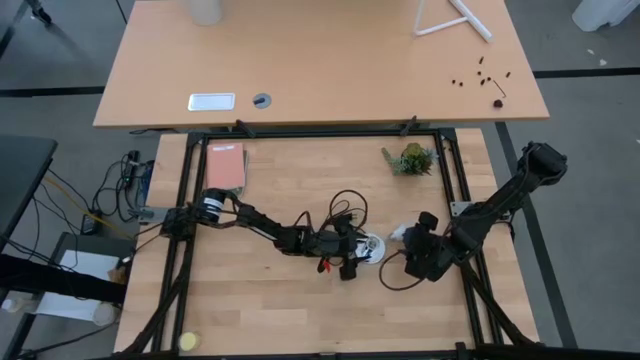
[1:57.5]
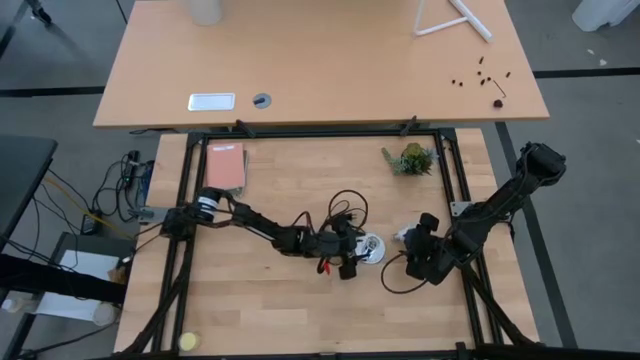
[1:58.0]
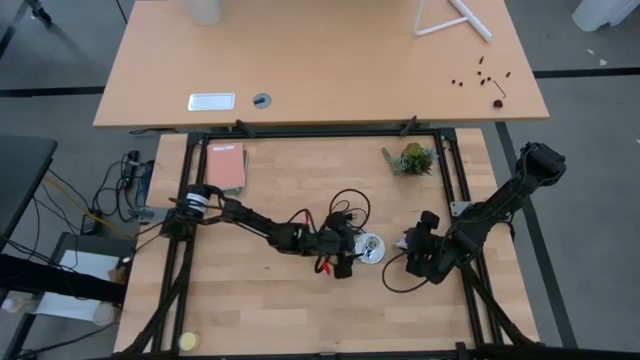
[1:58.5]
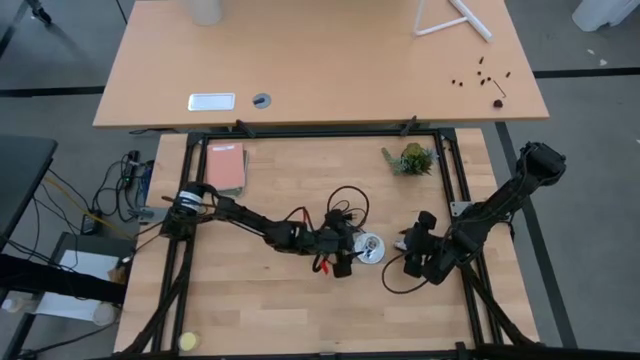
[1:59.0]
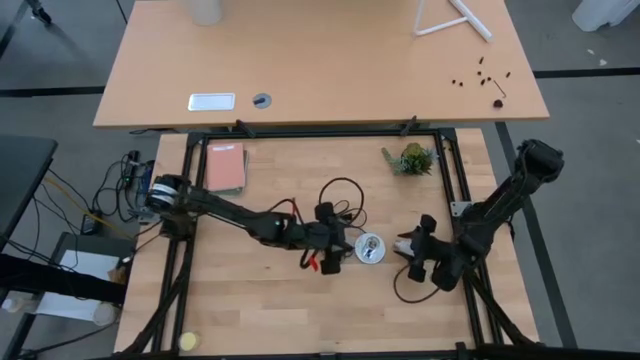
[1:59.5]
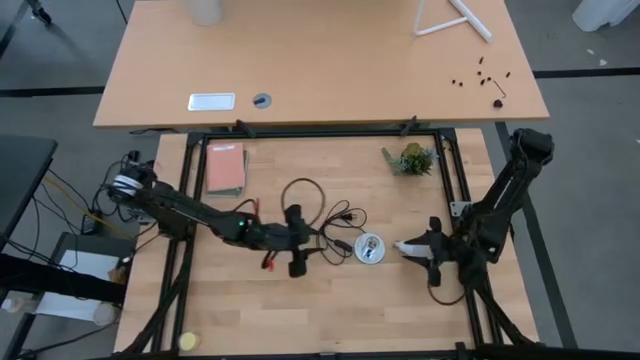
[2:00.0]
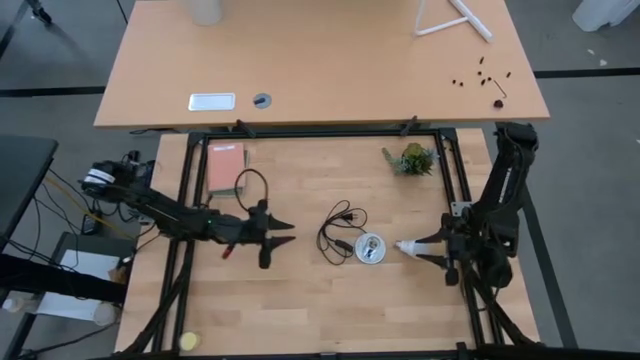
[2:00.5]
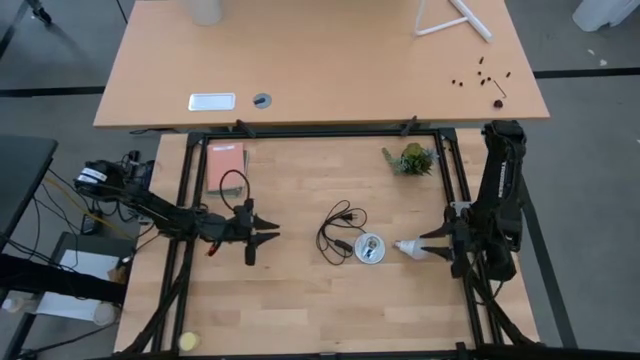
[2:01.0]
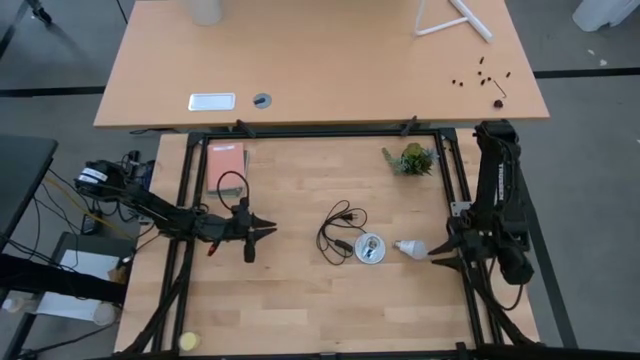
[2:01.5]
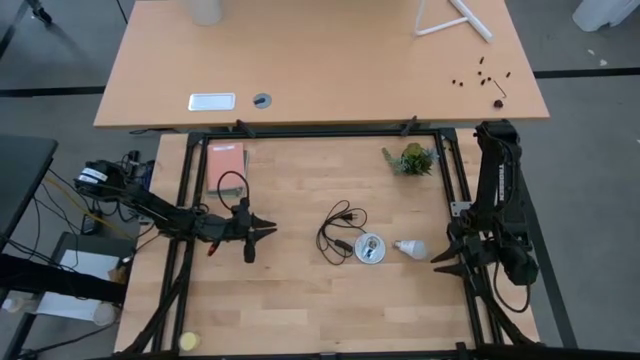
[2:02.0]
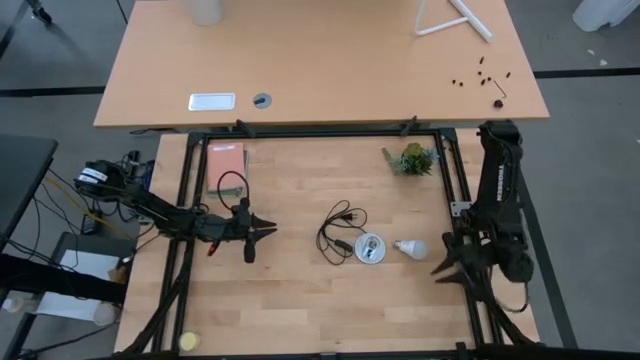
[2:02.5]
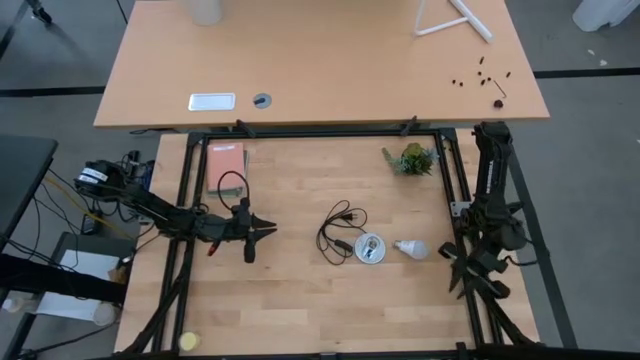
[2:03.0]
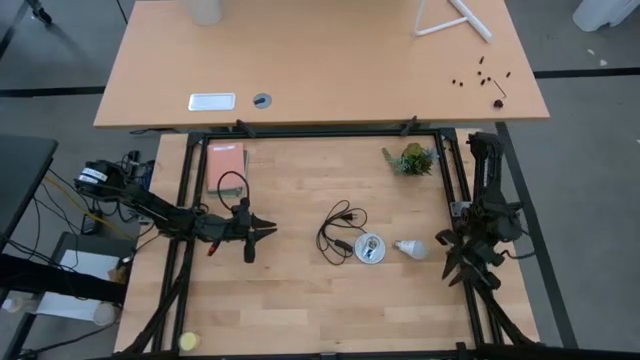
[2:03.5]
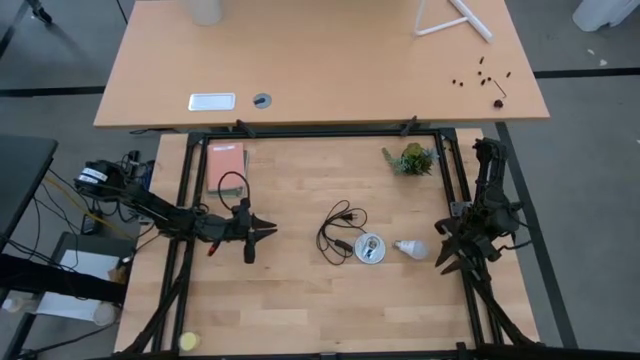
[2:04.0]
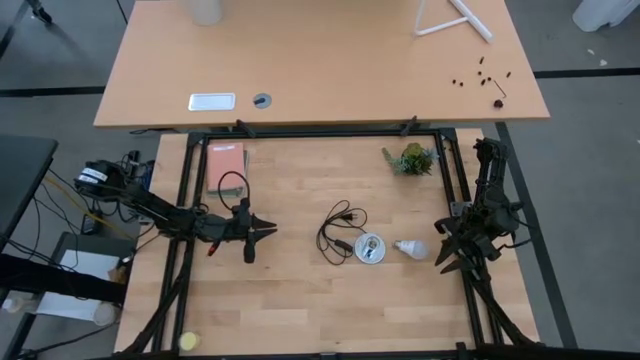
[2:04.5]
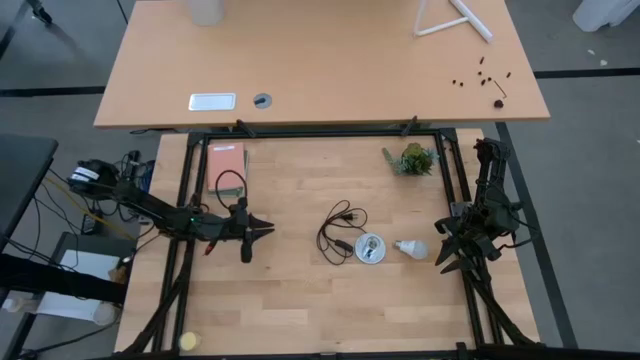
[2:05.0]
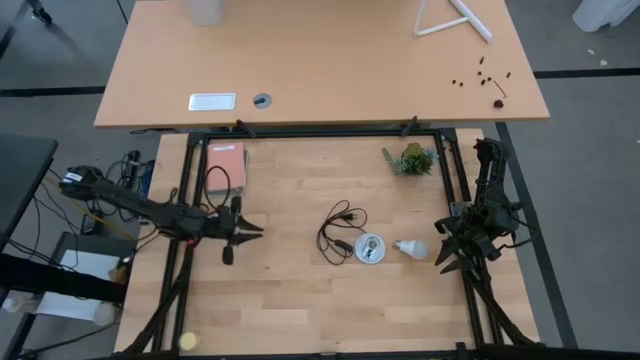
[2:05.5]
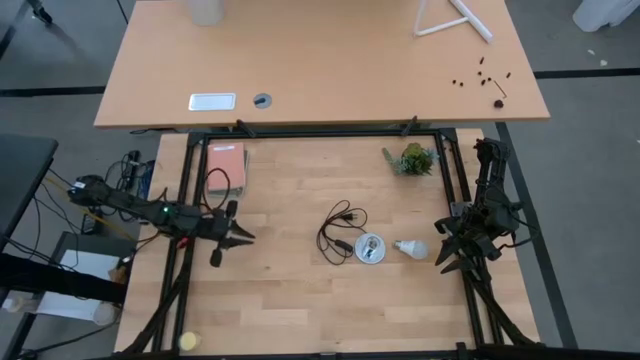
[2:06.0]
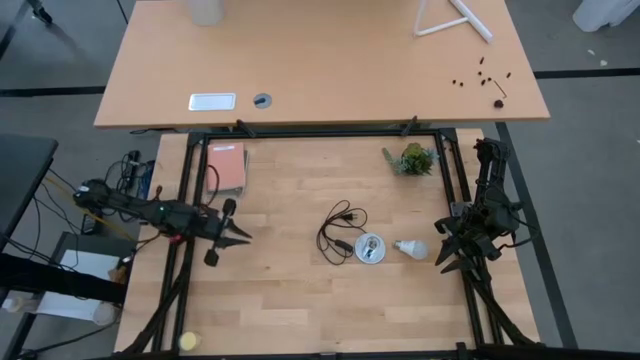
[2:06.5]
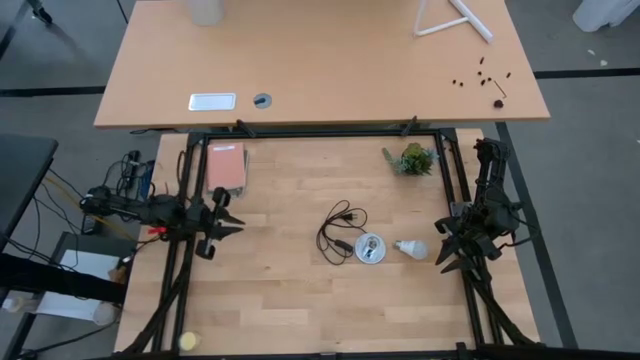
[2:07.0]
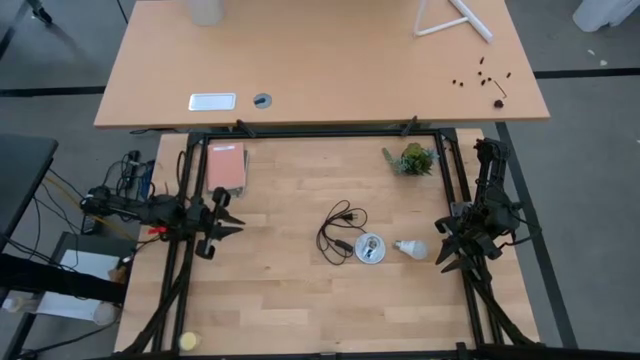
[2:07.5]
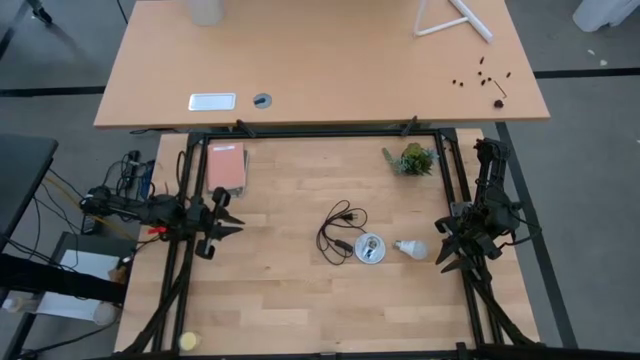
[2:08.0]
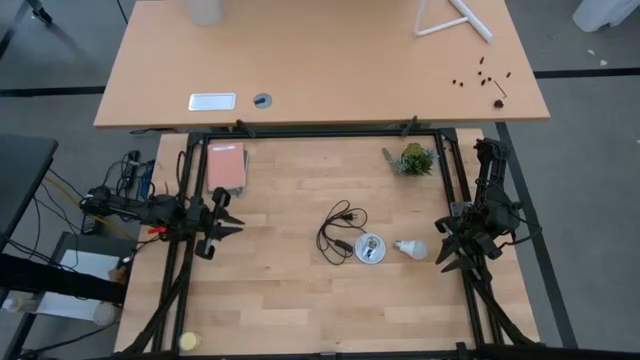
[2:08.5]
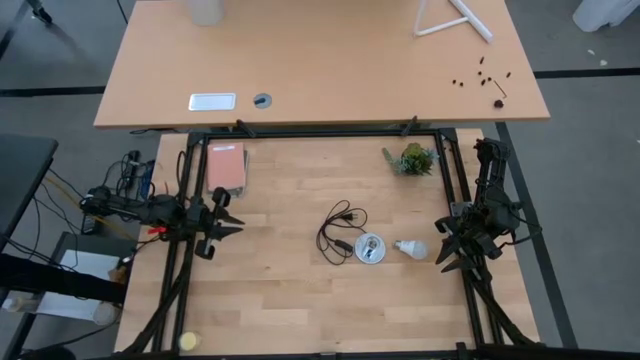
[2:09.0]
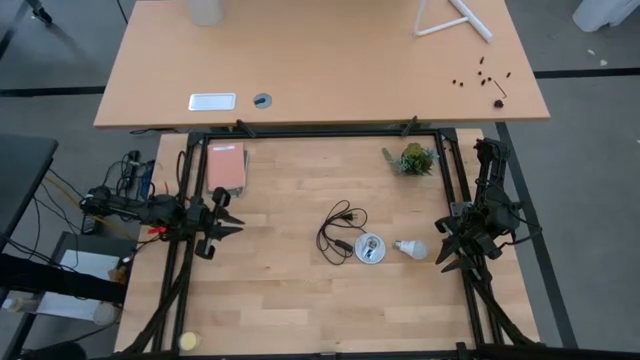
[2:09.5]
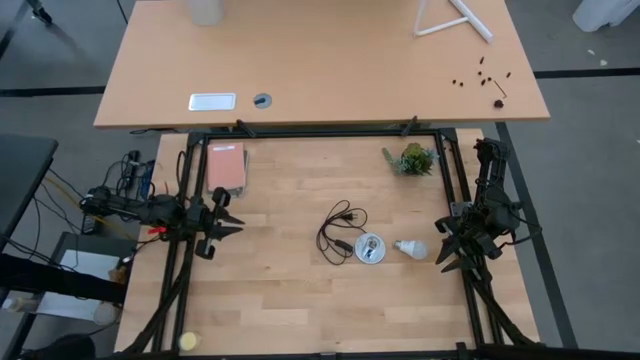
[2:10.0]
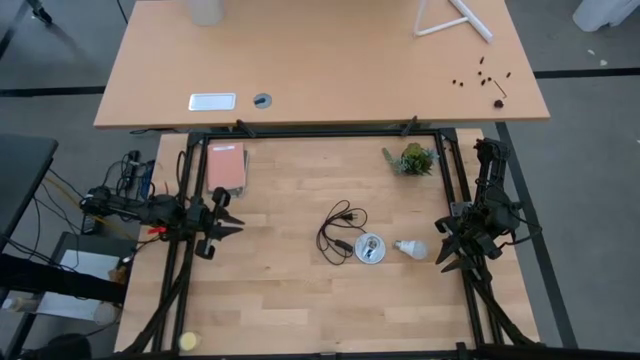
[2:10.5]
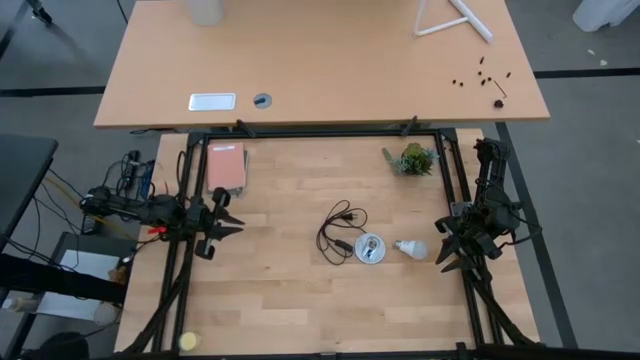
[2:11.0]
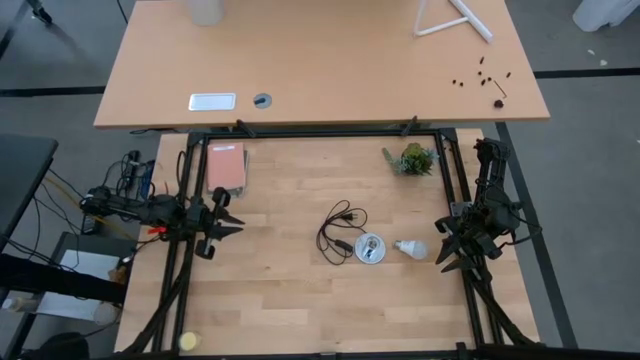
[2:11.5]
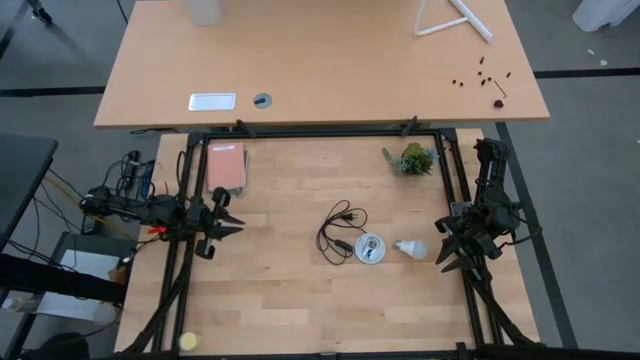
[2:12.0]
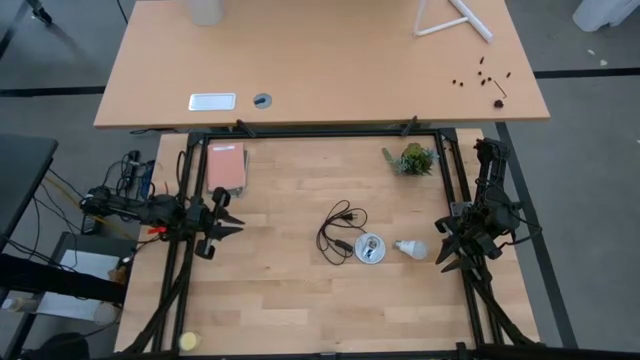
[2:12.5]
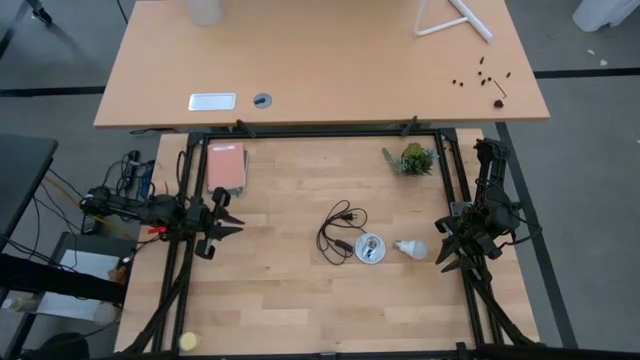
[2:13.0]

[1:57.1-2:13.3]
Task: Screw lightbulb
Return to Home Position
